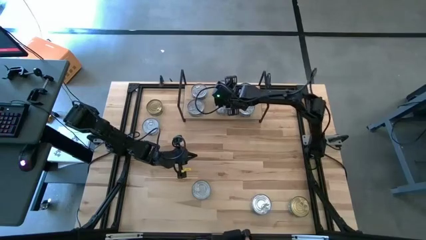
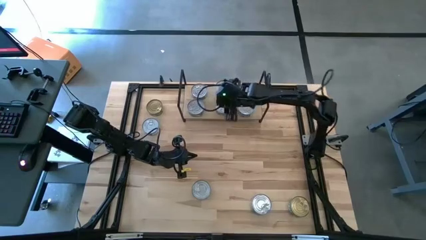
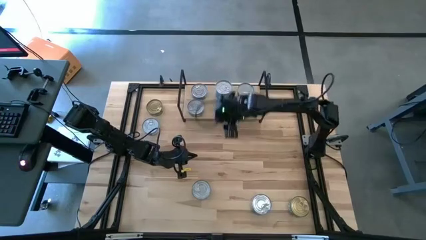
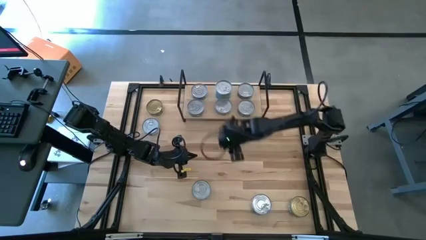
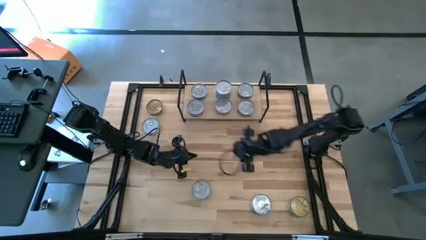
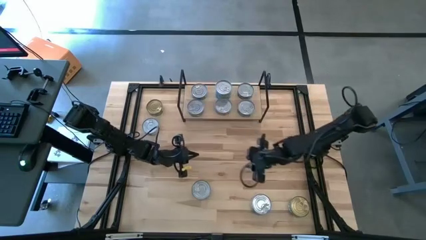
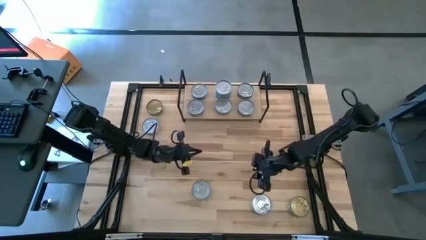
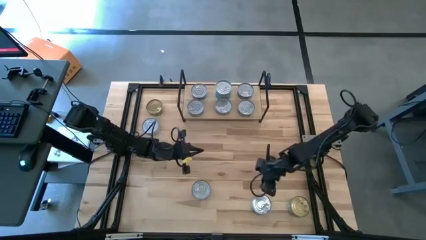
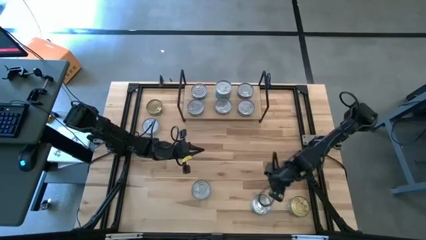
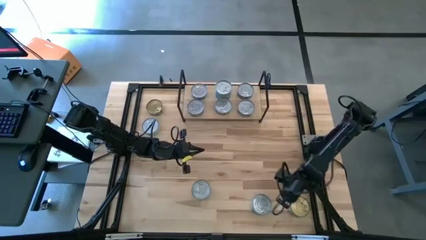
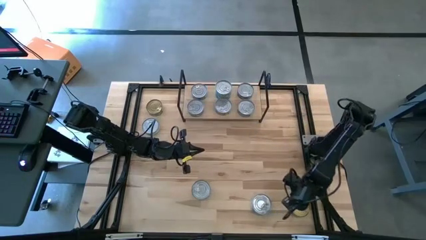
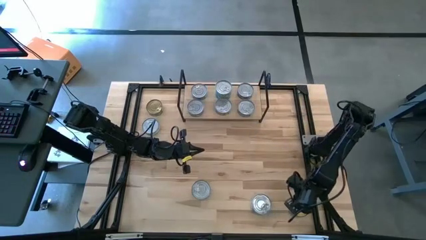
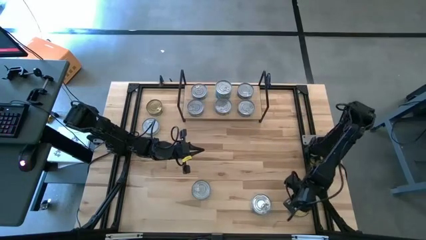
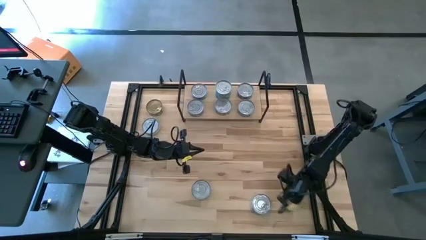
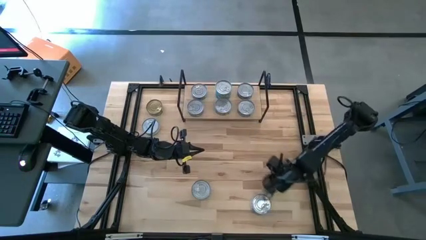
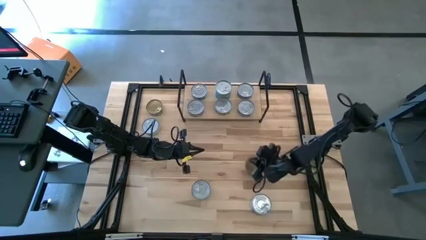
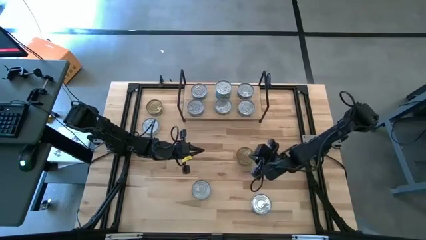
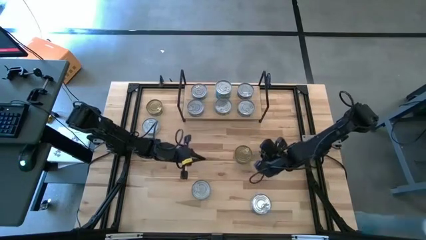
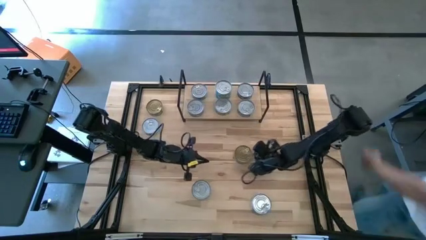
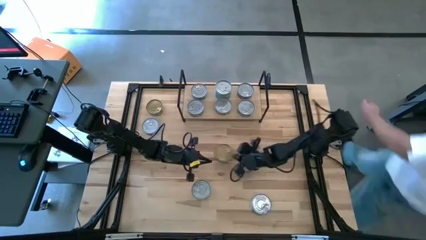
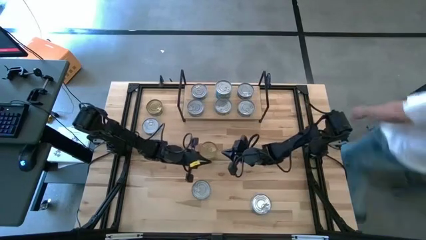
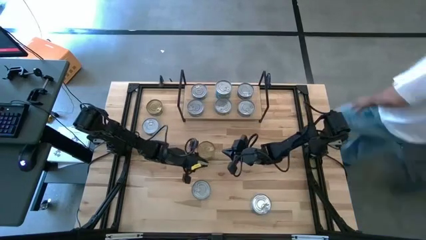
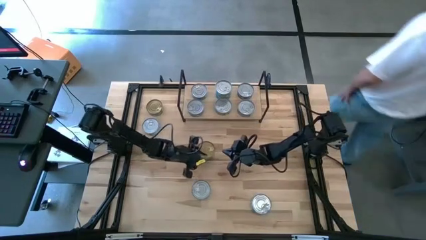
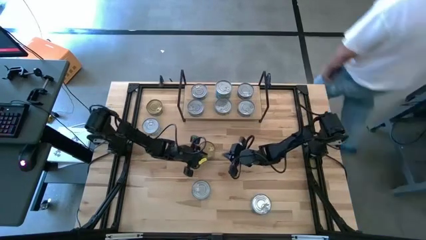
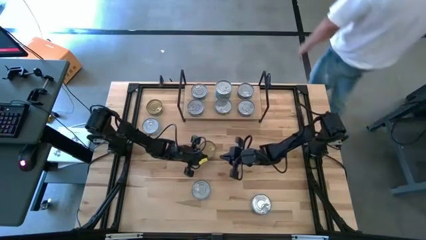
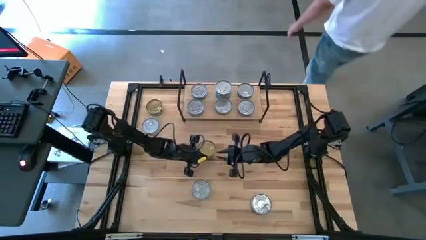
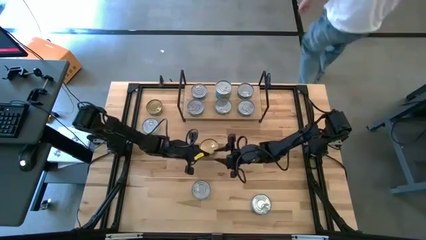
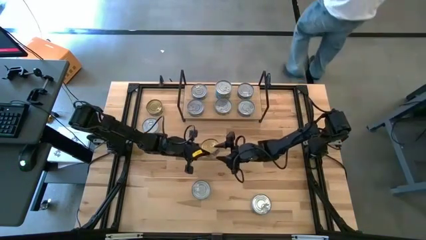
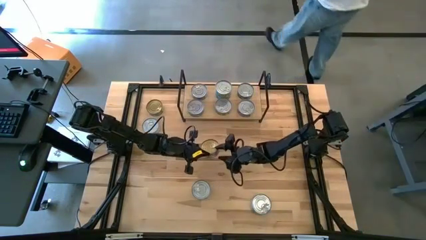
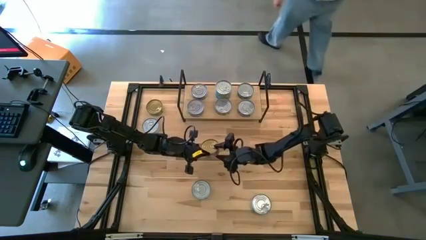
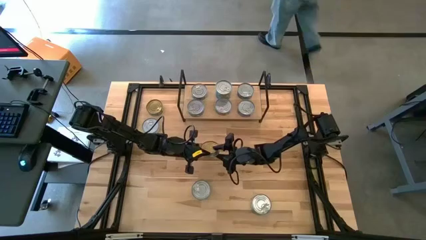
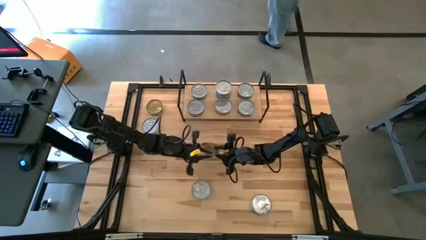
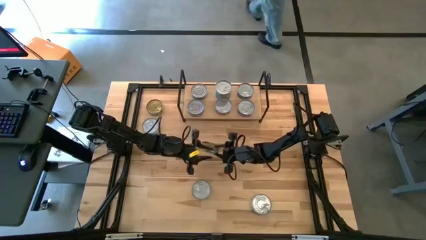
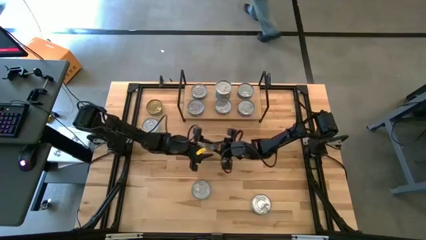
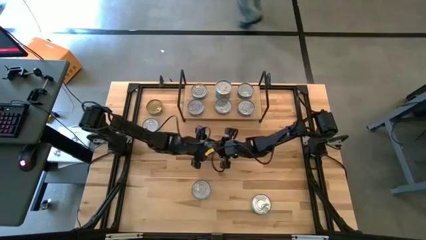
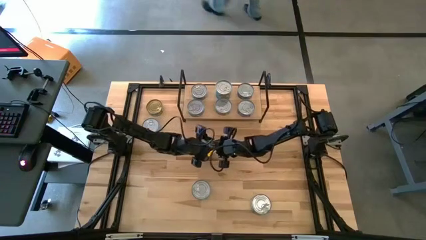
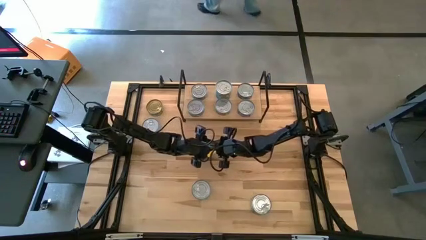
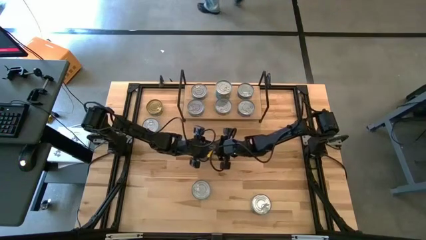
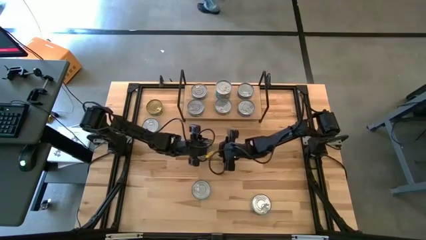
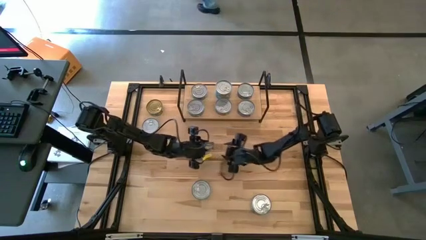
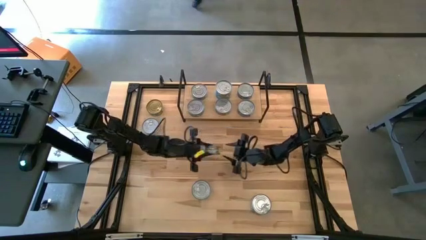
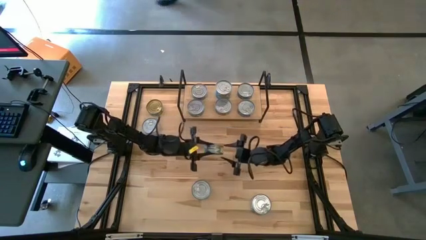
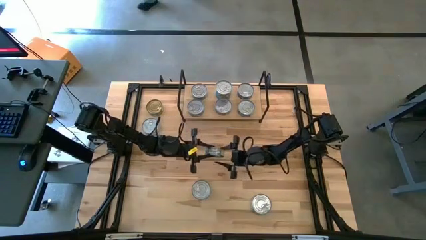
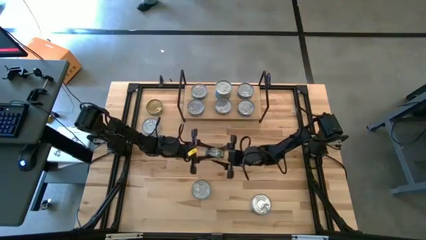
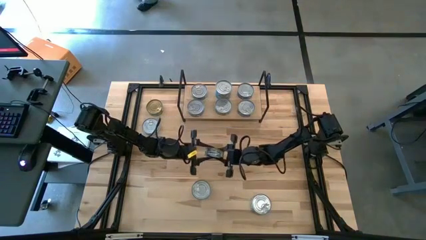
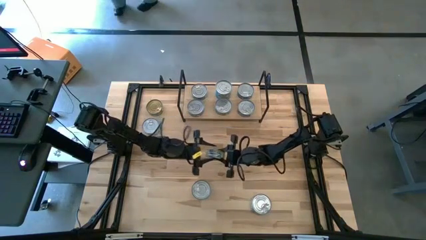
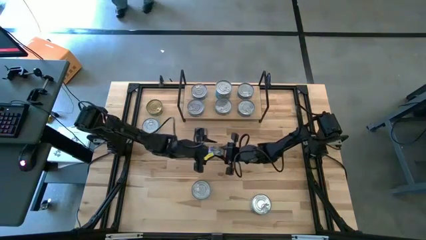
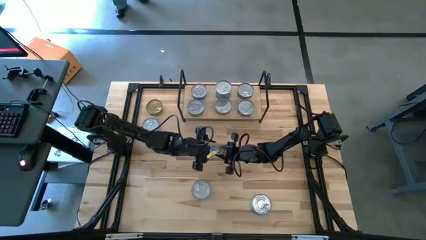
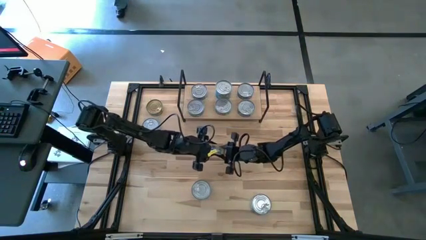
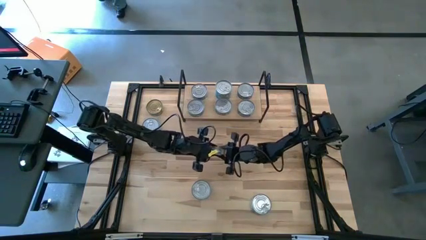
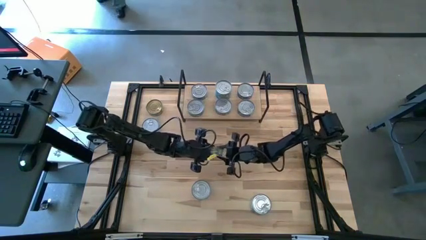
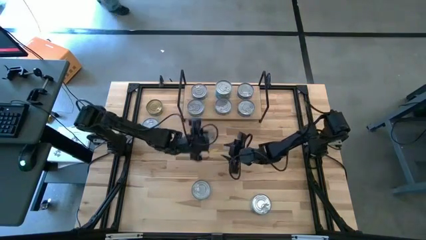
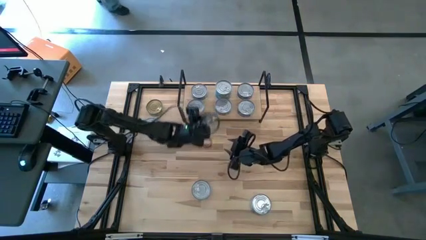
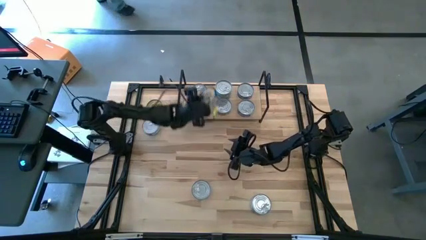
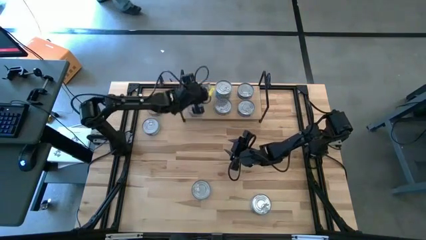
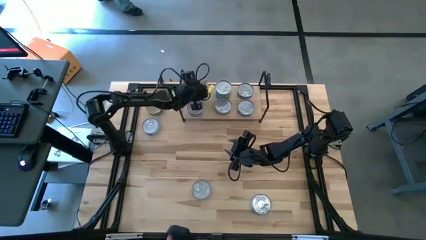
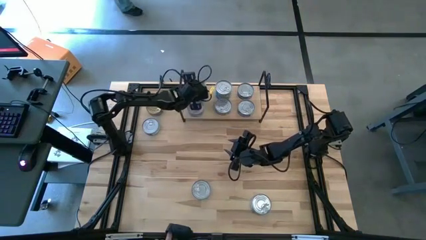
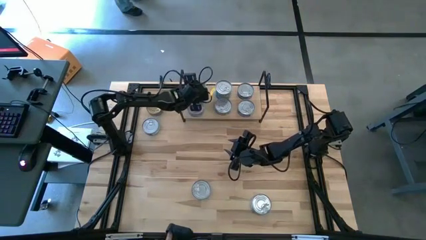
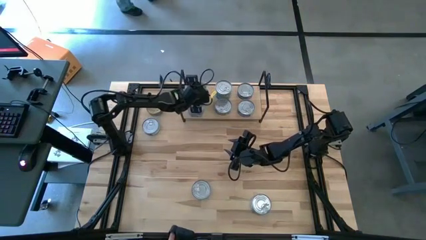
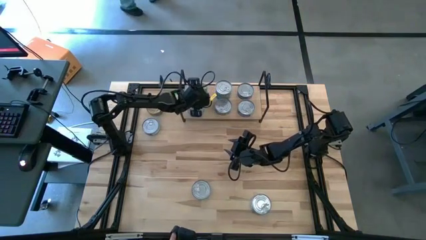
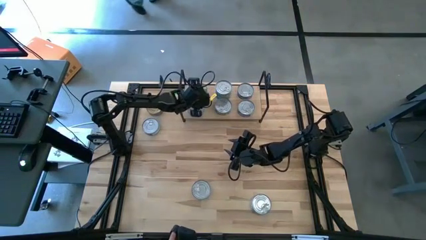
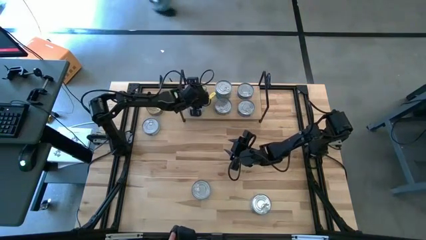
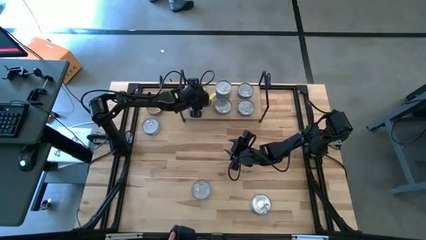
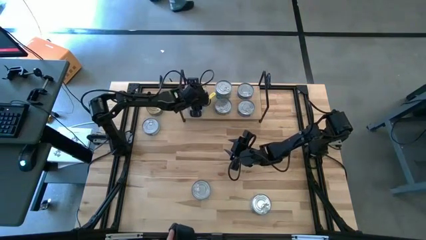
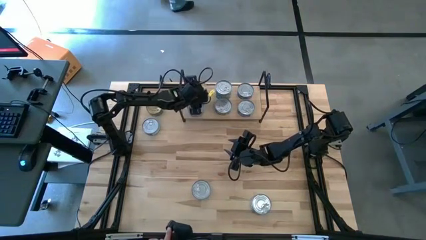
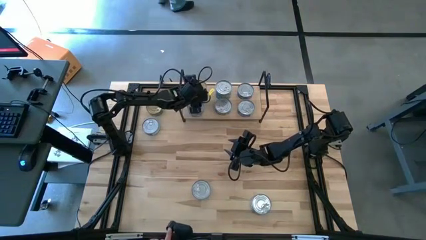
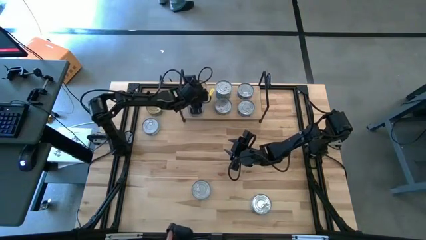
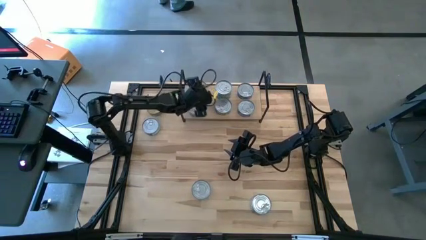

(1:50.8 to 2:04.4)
Task: Stack canned seafood by type on shelf
Stack the green tuna can on top of the green tuna can on the shelf
